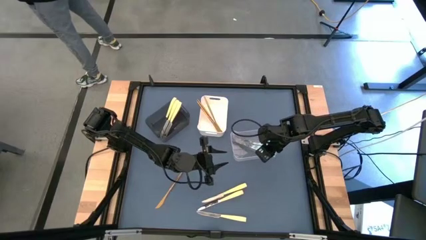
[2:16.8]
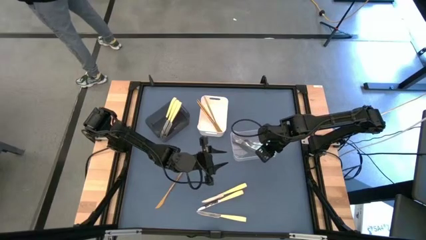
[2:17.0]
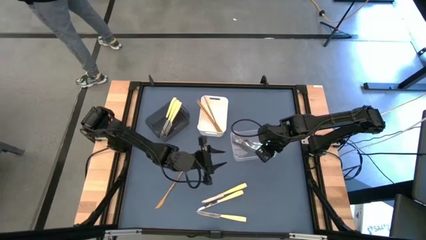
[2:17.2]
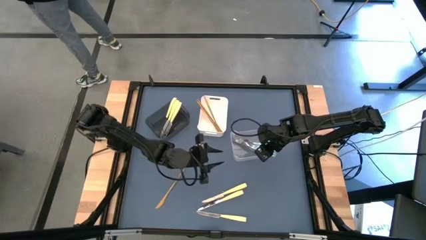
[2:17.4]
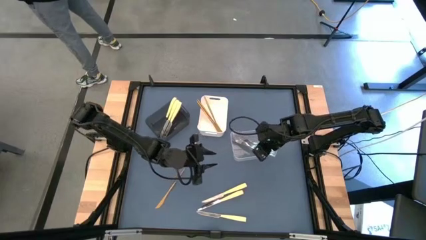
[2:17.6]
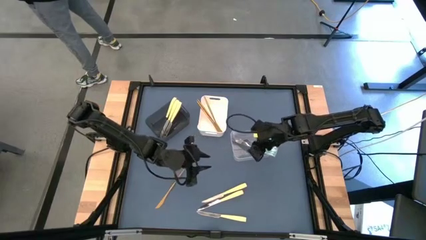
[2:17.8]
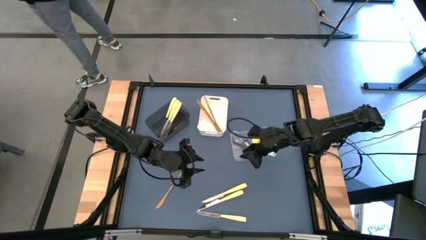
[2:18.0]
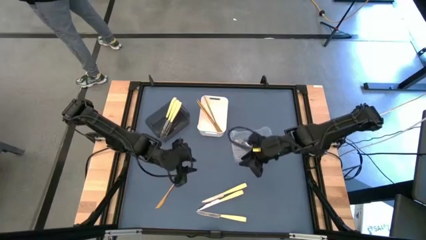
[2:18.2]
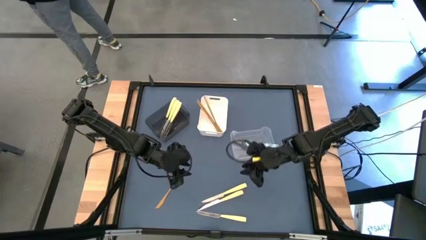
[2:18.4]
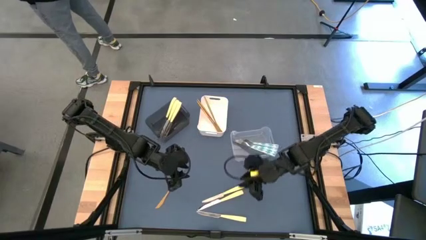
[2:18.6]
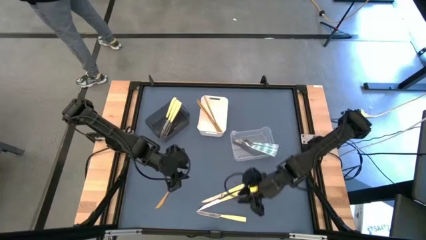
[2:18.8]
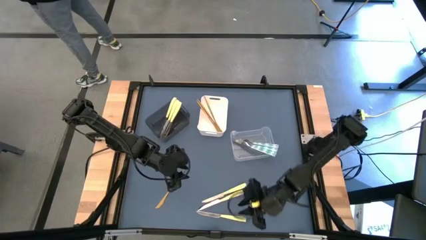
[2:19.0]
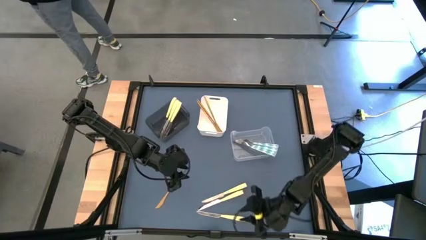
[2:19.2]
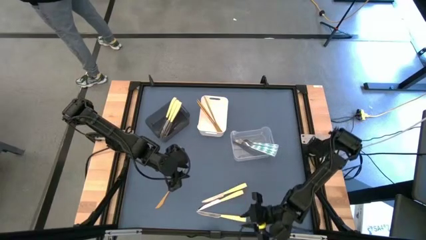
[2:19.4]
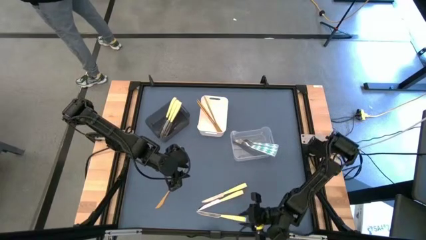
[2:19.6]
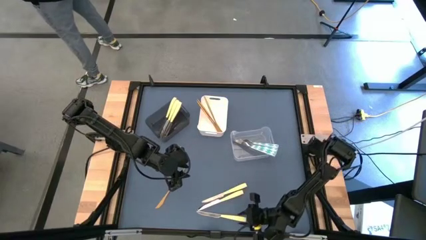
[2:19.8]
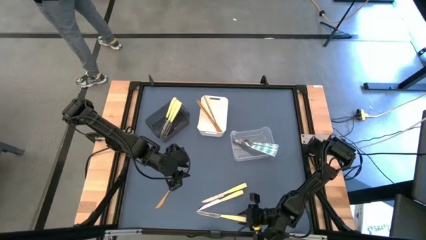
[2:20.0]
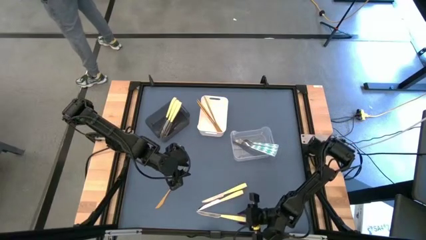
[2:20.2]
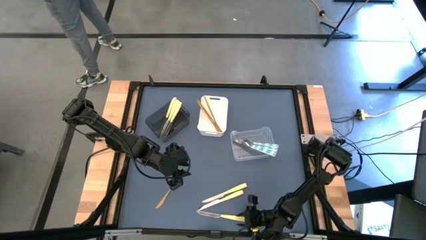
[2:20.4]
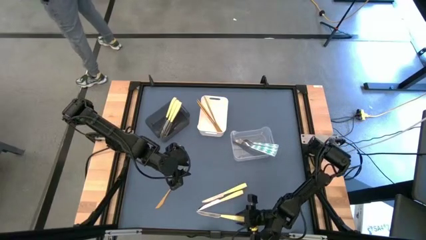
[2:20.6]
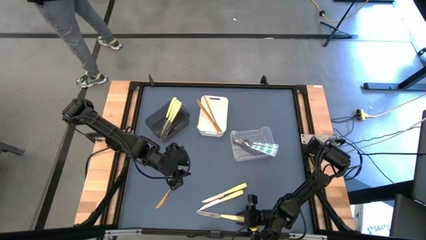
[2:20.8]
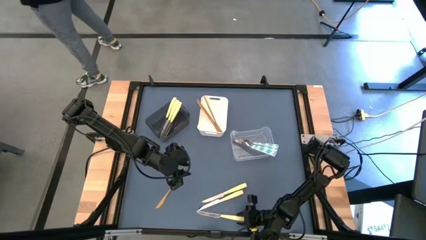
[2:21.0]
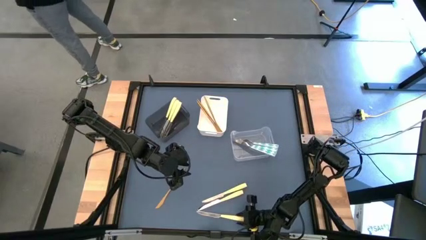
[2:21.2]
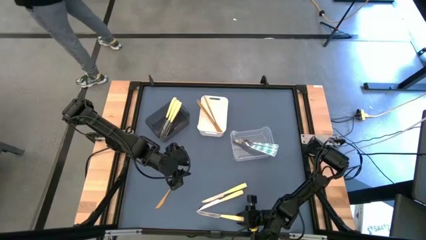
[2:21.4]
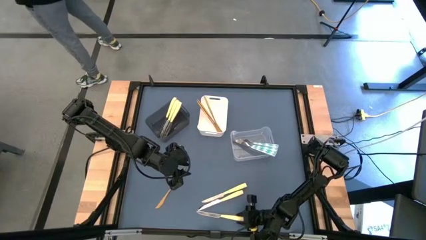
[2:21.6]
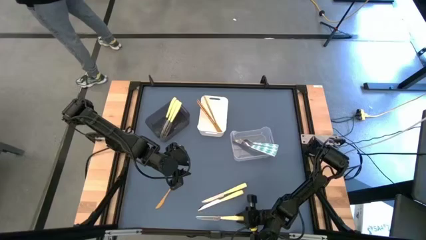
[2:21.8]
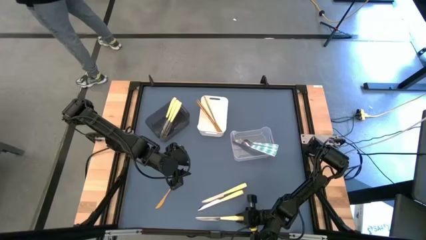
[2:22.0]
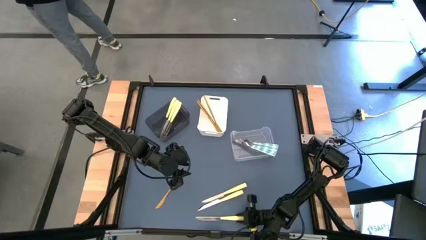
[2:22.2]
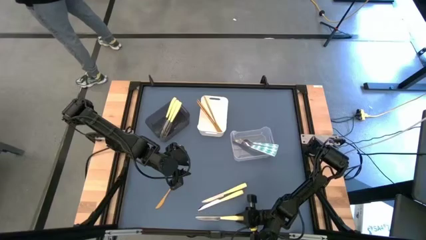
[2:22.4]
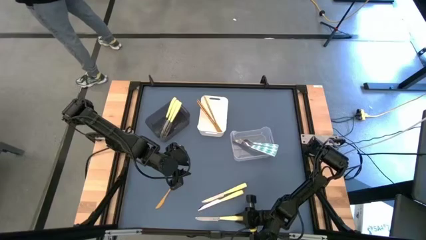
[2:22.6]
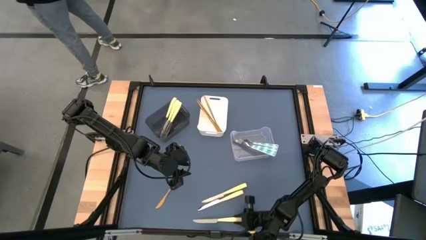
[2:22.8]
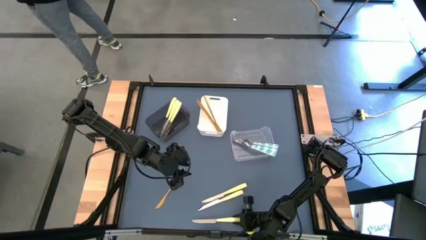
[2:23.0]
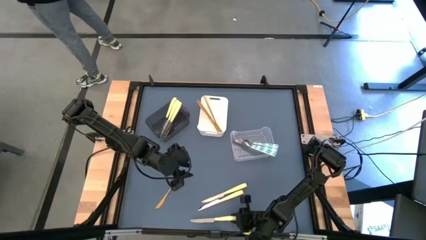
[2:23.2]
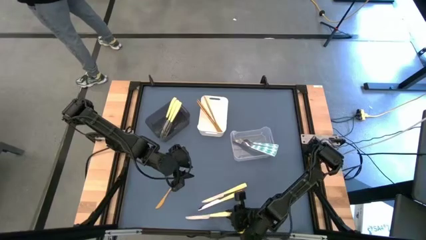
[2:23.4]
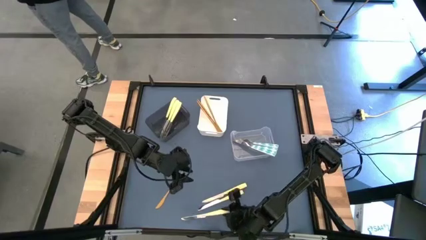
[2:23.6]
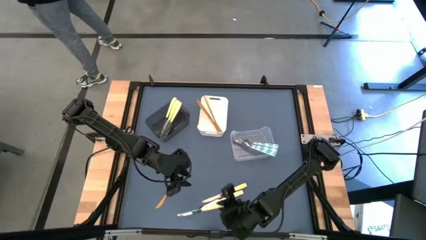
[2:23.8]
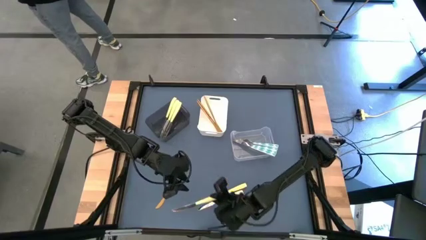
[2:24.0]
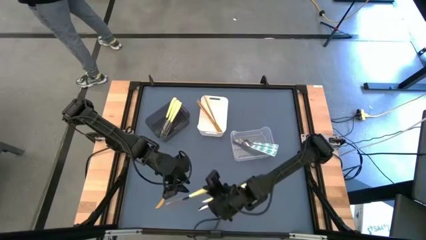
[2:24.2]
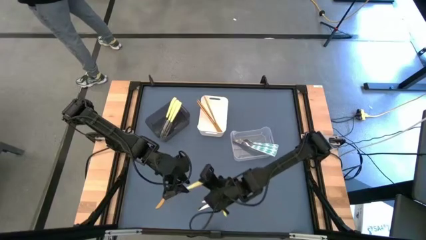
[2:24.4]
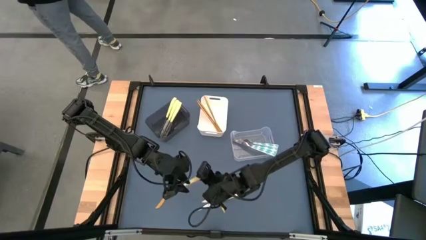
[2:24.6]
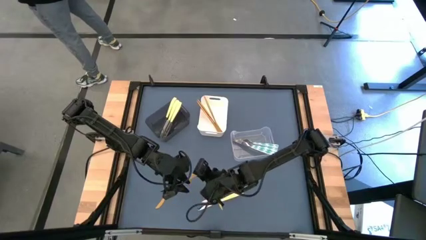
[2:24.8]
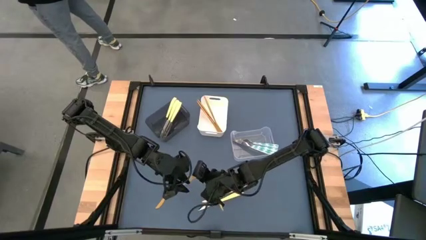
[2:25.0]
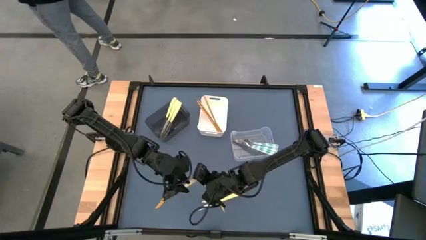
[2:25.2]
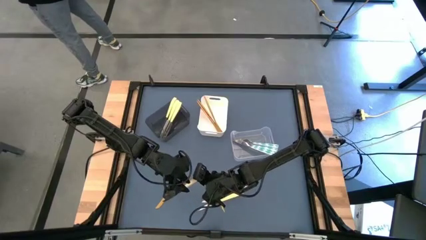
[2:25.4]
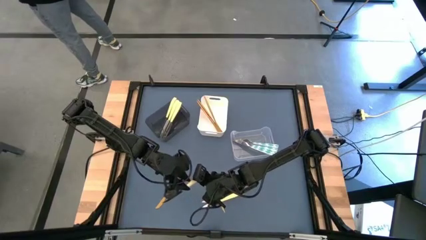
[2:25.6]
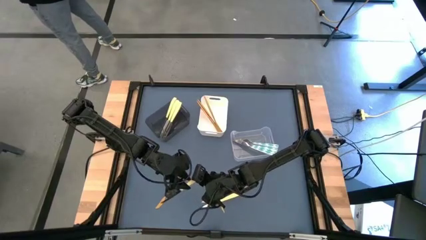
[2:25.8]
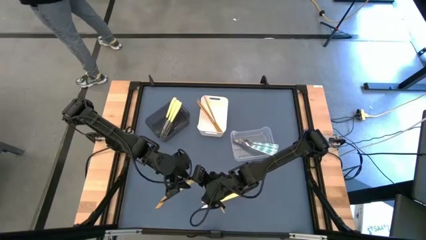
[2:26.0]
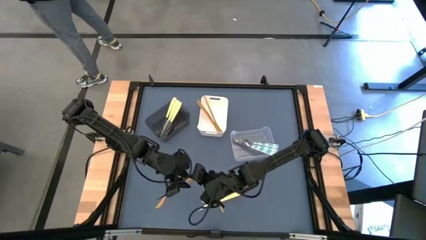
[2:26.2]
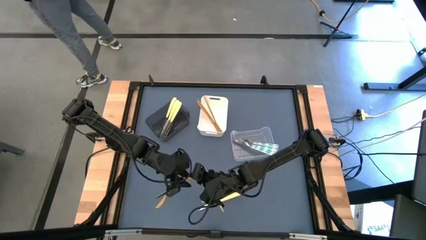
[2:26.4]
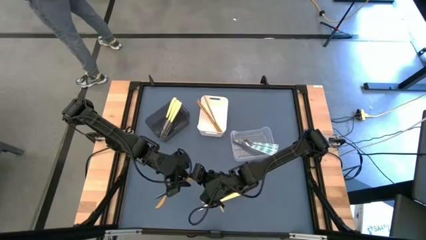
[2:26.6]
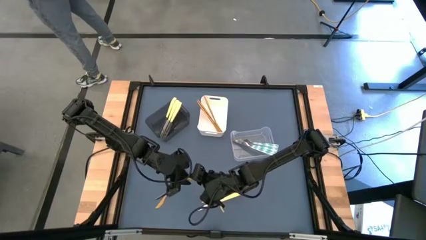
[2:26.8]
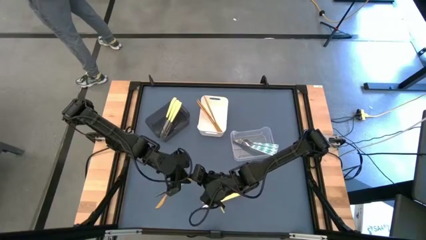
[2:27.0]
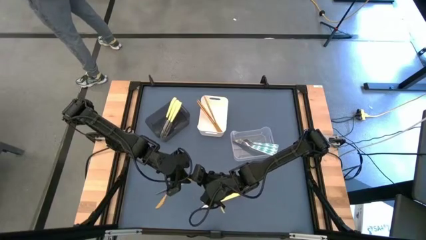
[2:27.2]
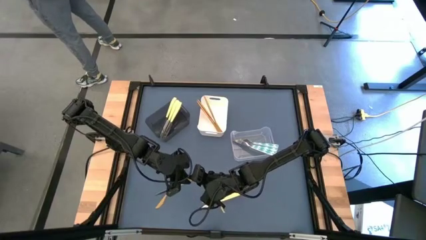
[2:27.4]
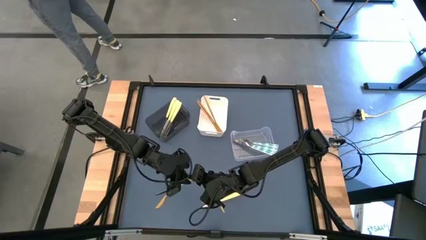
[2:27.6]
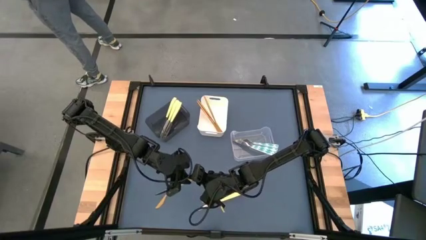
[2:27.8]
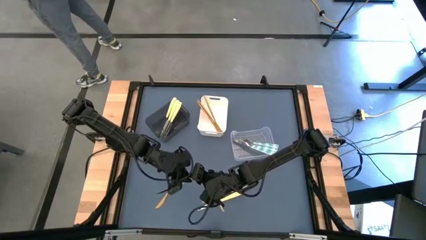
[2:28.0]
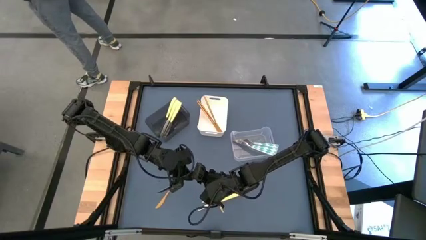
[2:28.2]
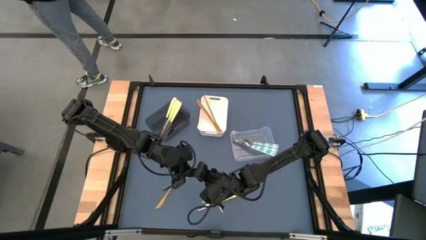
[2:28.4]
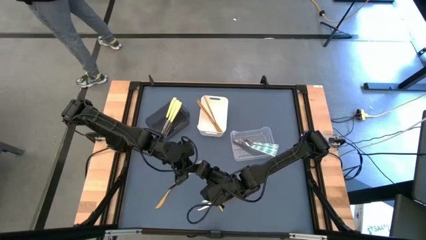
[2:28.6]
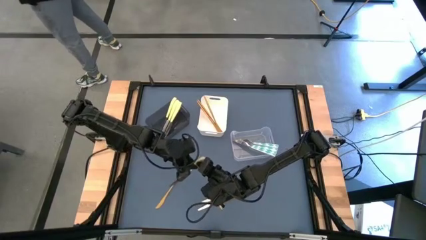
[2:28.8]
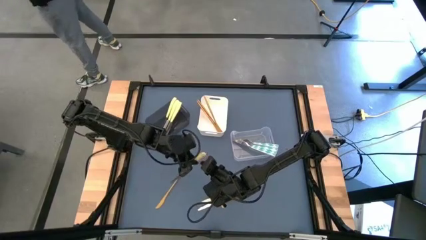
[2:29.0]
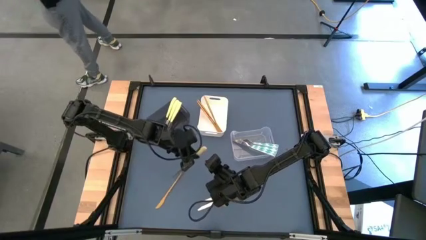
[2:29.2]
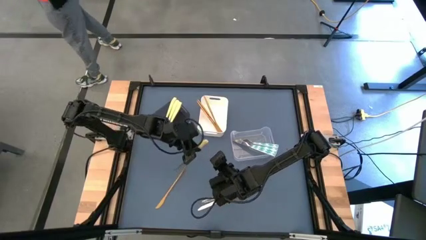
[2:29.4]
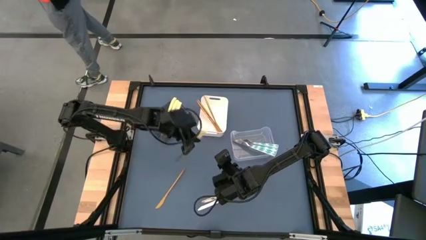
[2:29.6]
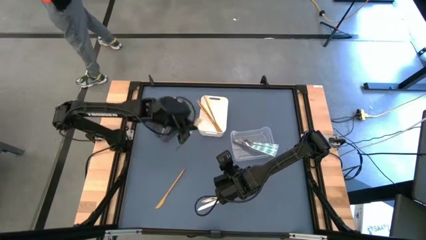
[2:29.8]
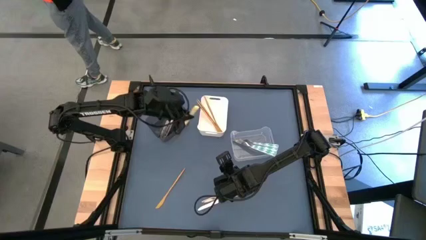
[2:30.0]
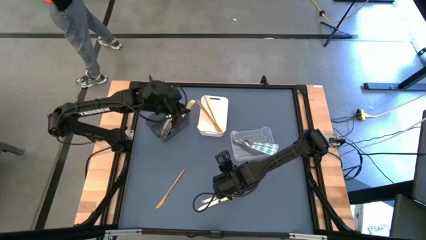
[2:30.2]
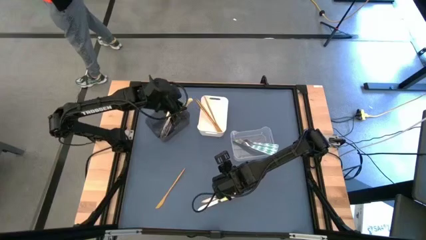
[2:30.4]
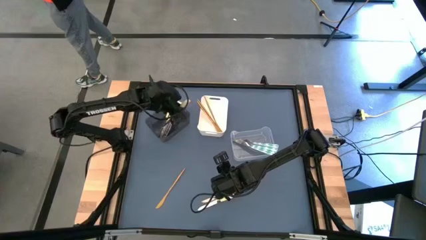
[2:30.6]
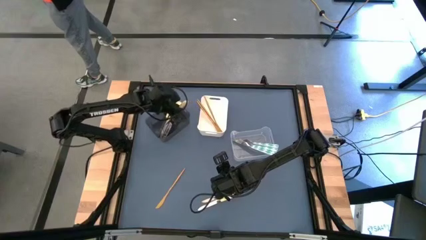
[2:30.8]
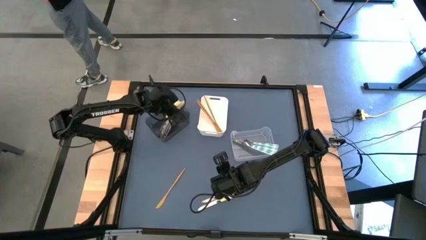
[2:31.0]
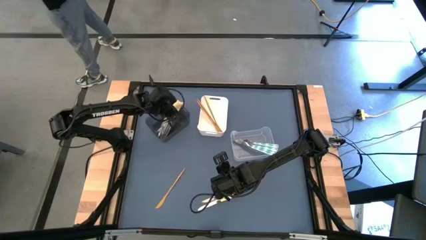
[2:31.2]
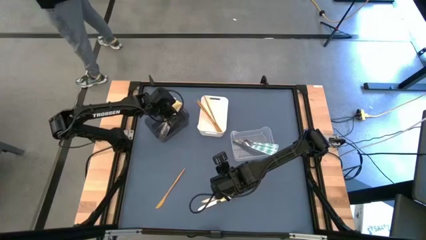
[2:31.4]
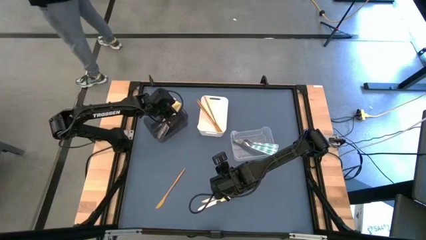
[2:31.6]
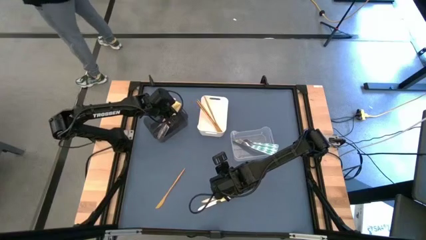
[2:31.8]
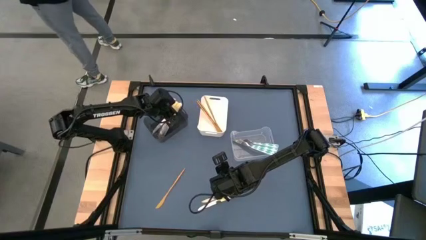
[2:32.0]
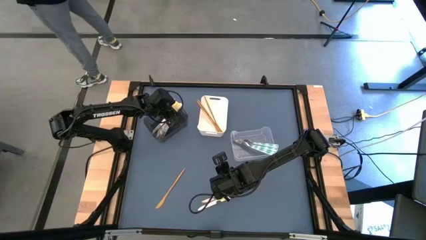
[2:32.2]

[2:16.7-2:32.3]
Task: Sort silverware by color (type)
Put the yellow knife into the black bin

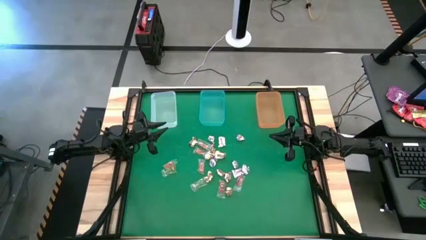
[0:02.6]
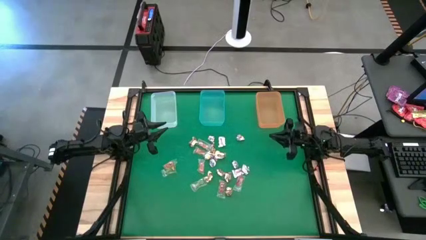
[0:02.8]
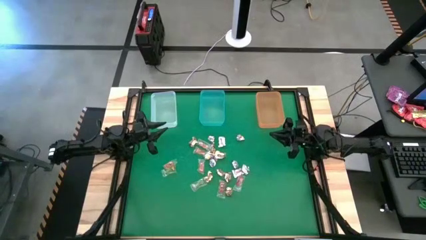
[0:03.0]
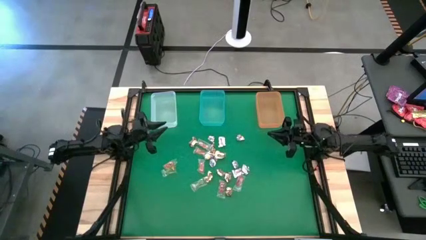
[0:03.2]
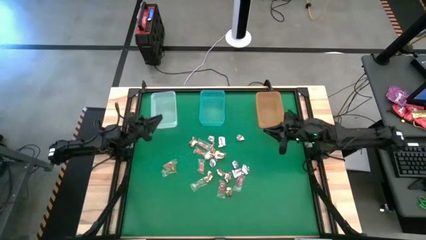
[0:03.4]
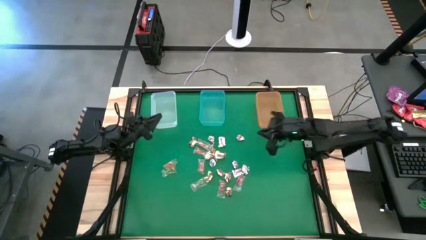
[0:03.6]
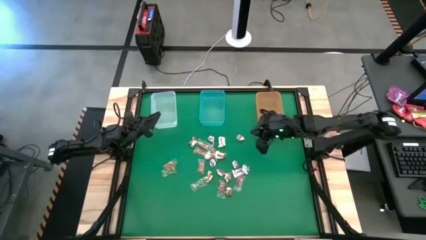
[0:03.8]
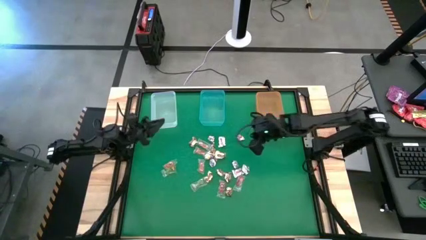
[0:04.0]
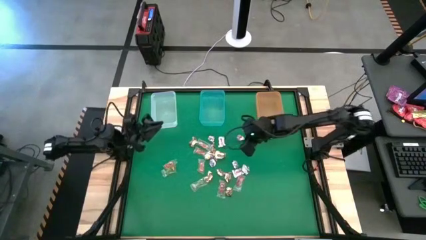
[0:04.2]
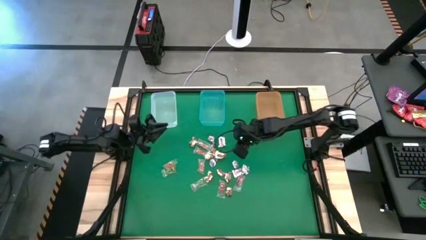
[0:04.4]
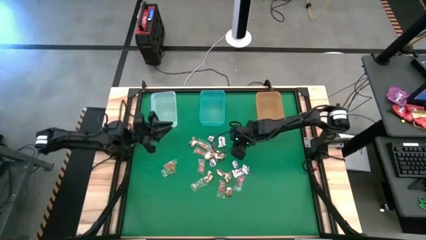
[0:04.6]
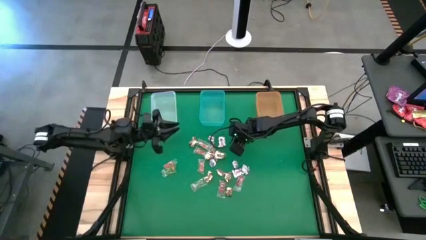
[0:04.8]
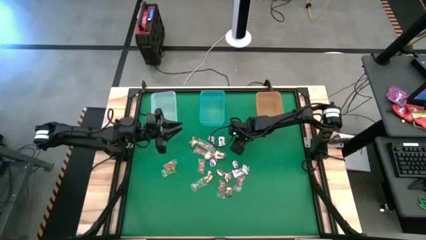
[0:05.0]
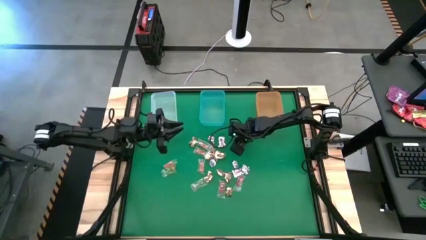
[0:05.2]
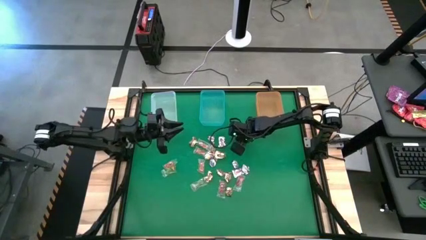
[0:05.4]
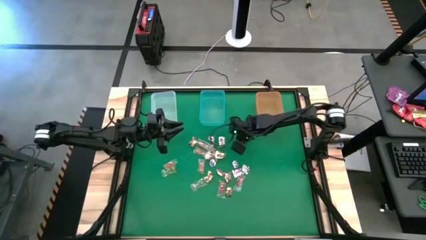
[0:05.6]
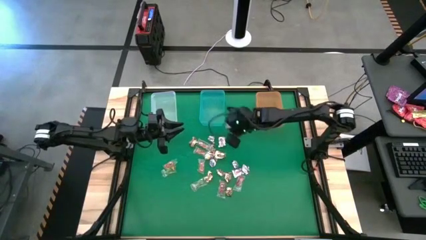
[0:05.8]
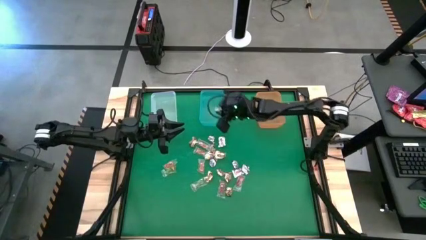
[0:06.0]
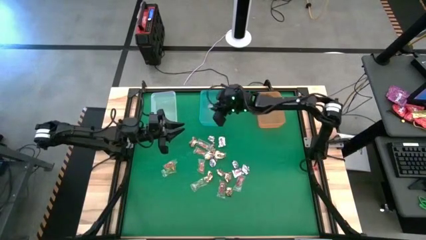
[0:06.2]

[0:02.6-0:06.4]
Task: Sort candy by brand, put in halloween buckets
Put the silver wrap candy into the blue bin
